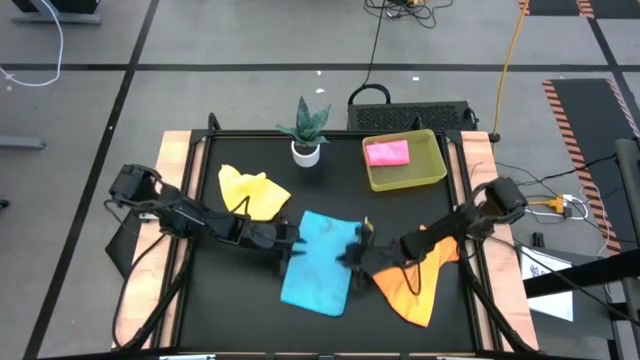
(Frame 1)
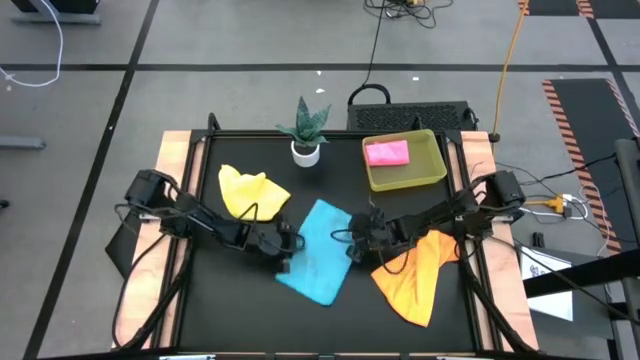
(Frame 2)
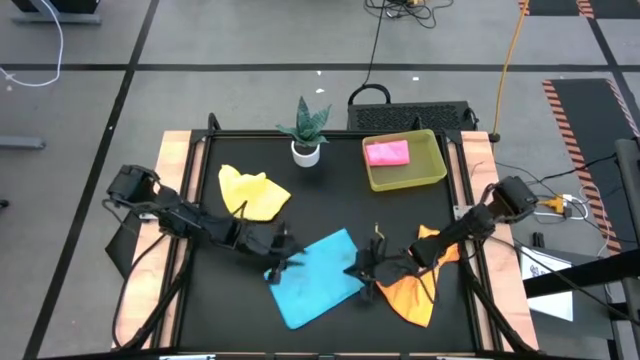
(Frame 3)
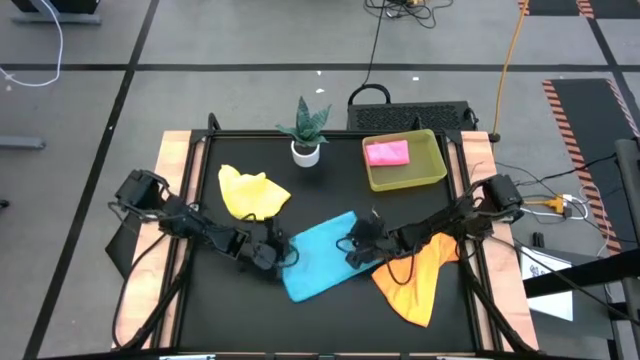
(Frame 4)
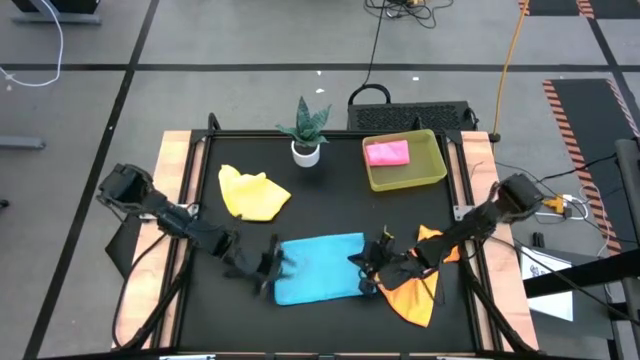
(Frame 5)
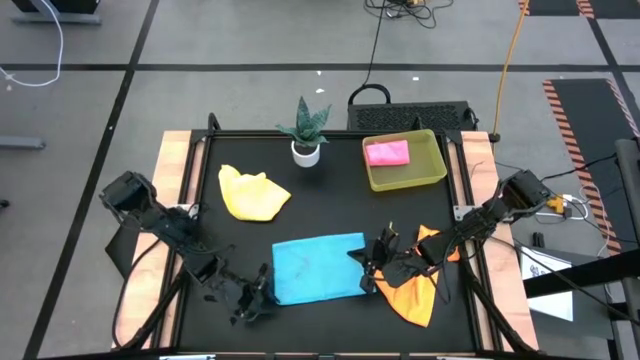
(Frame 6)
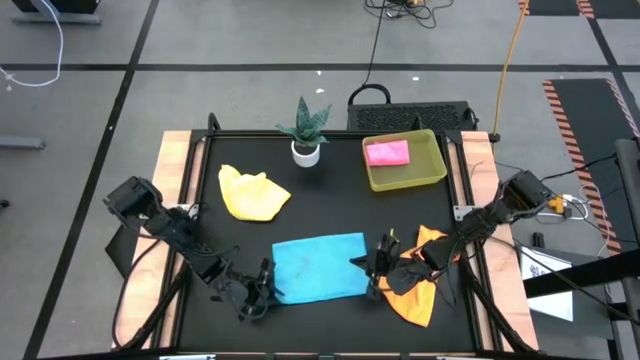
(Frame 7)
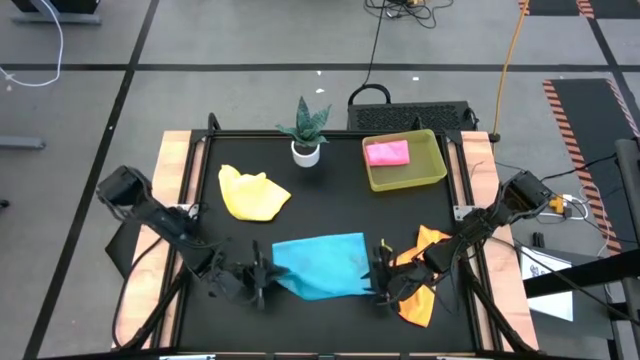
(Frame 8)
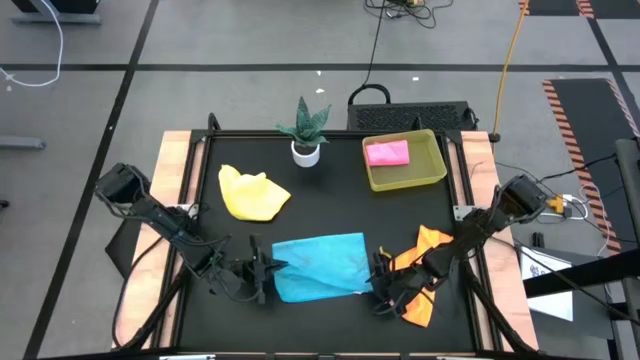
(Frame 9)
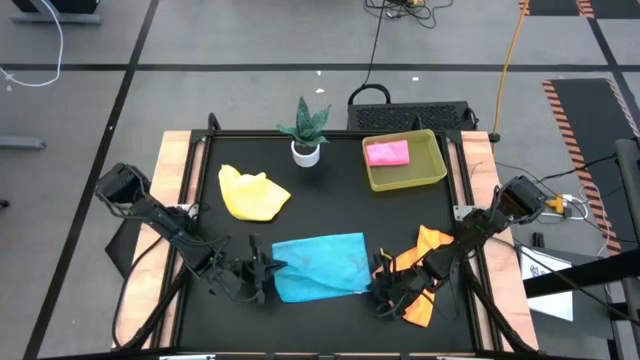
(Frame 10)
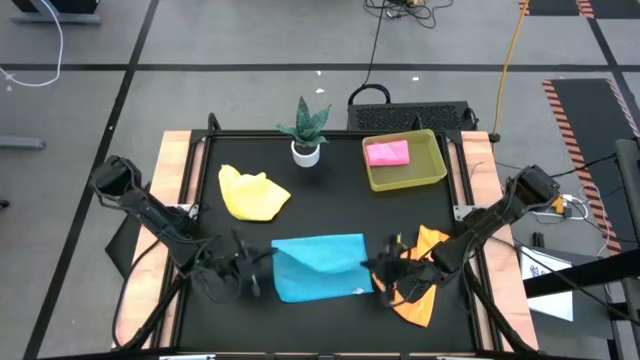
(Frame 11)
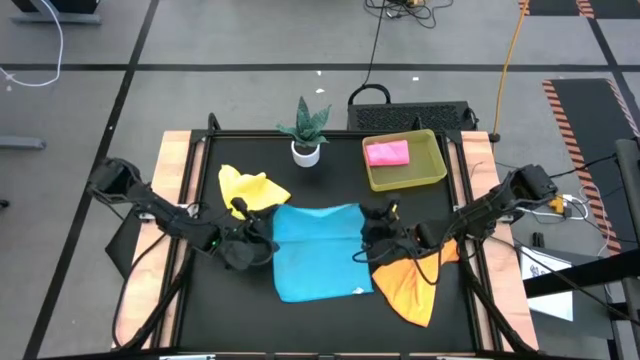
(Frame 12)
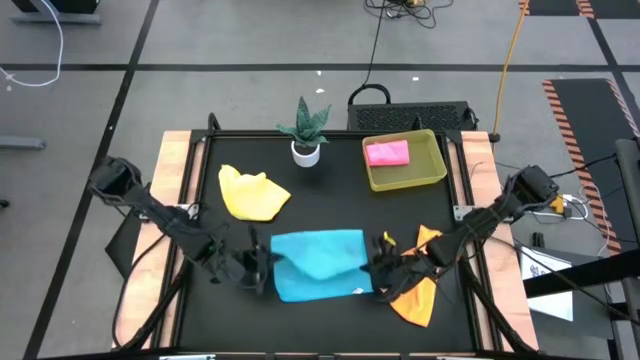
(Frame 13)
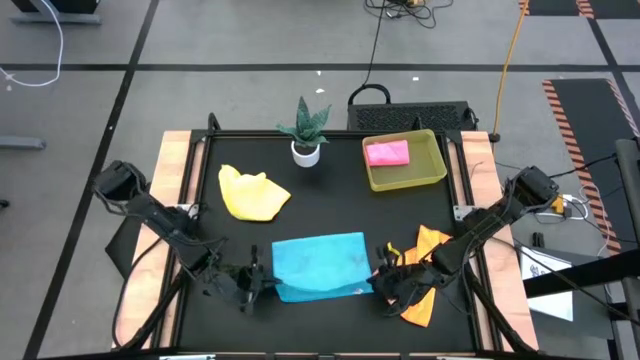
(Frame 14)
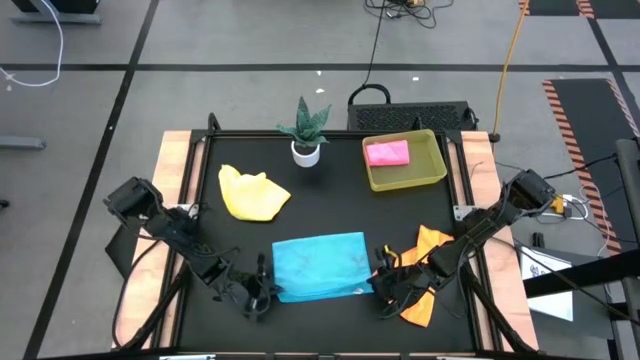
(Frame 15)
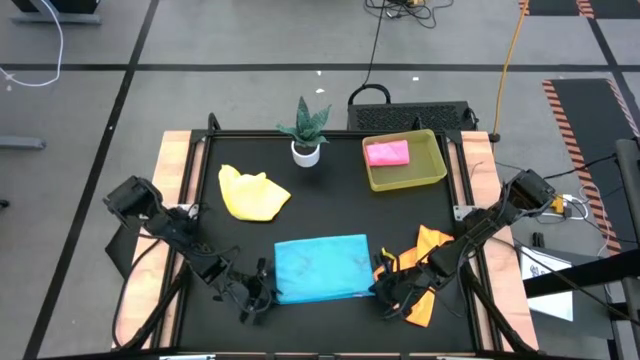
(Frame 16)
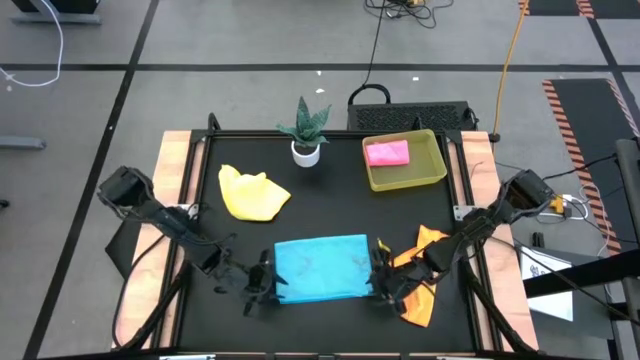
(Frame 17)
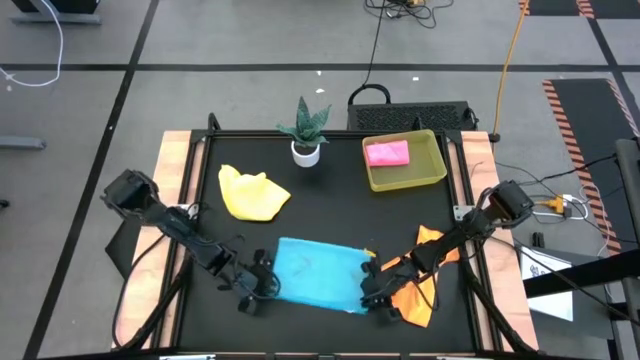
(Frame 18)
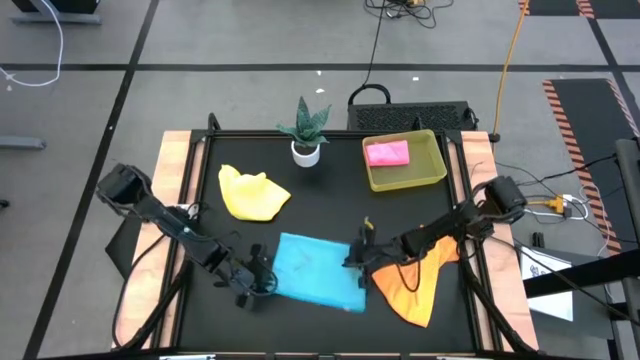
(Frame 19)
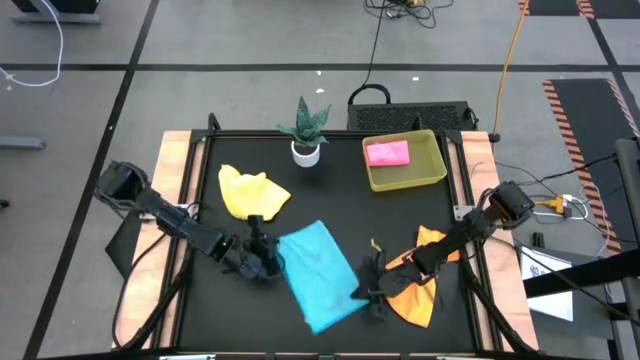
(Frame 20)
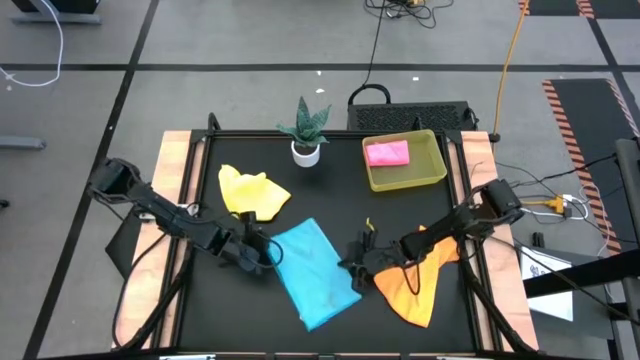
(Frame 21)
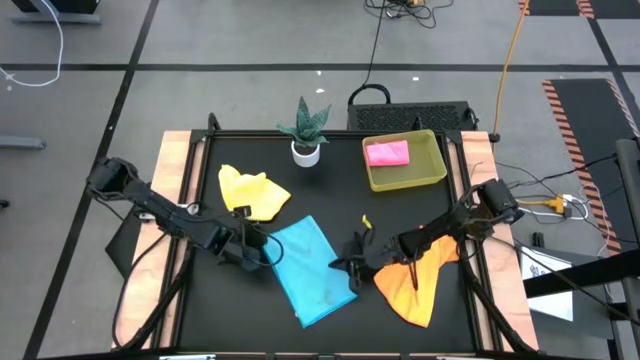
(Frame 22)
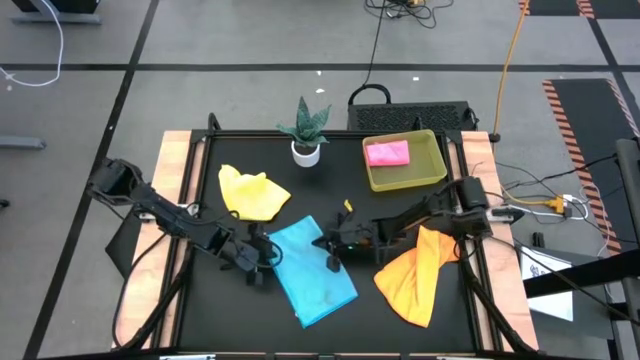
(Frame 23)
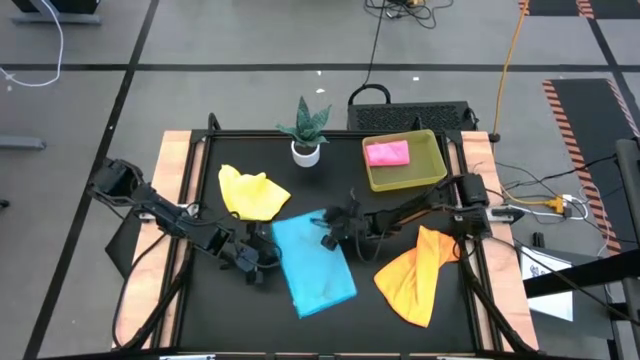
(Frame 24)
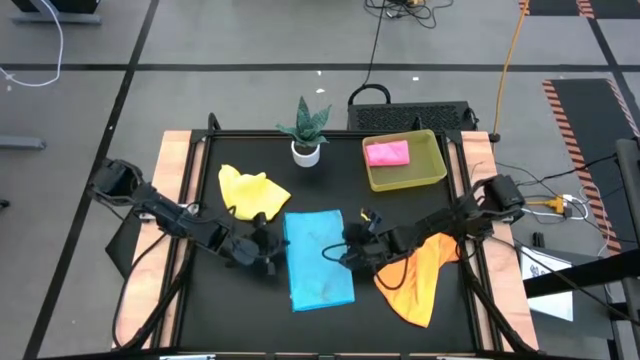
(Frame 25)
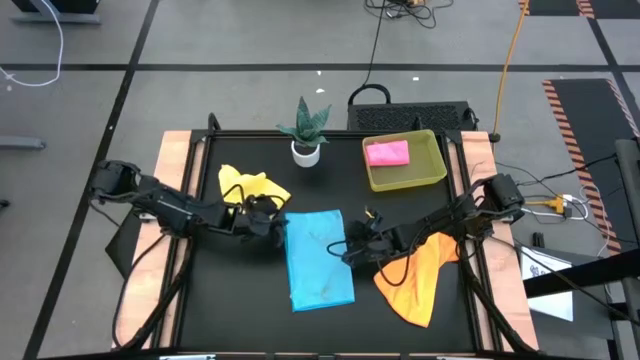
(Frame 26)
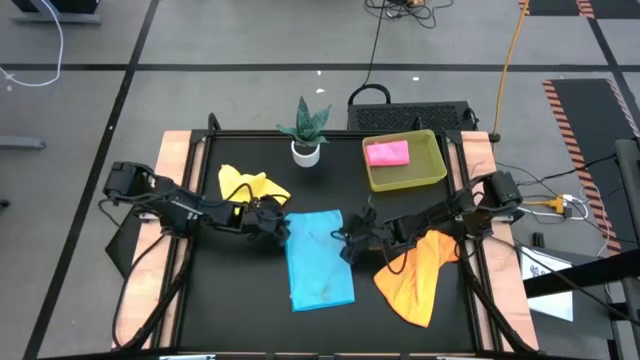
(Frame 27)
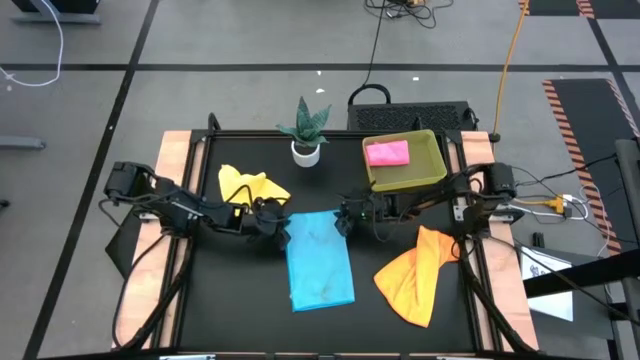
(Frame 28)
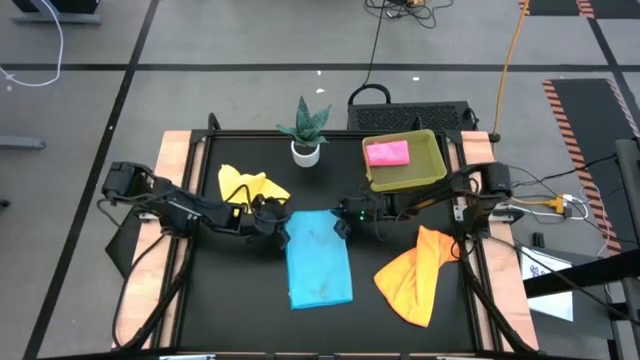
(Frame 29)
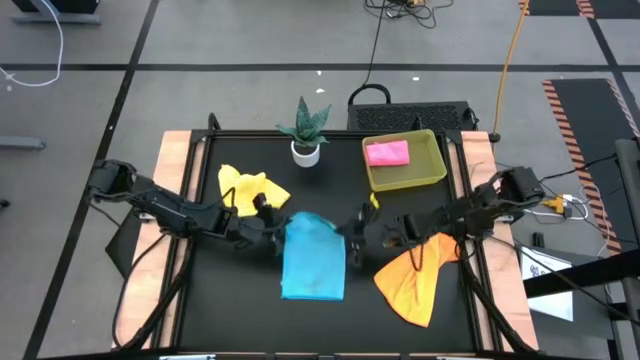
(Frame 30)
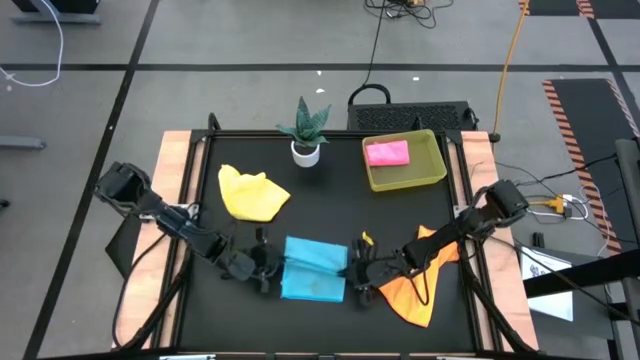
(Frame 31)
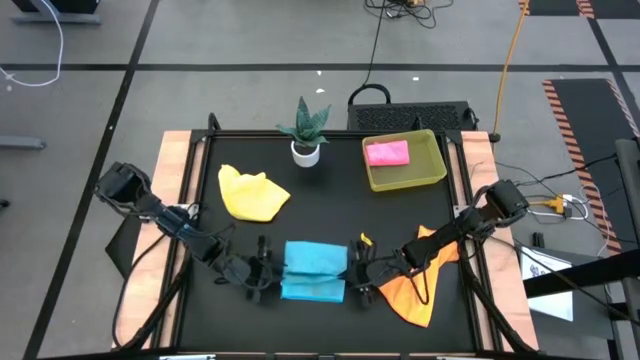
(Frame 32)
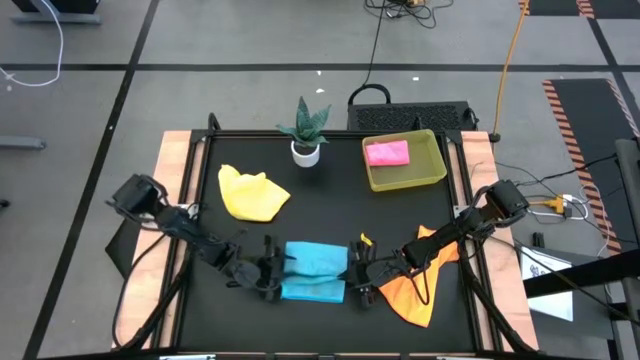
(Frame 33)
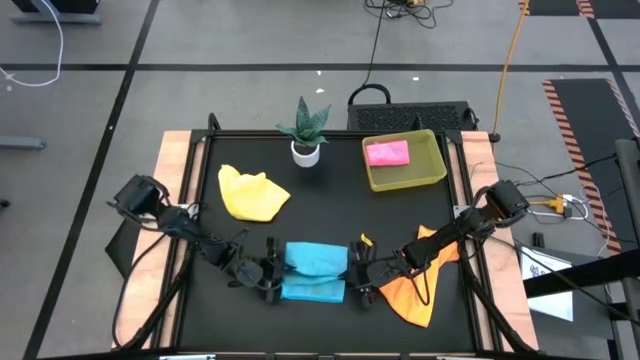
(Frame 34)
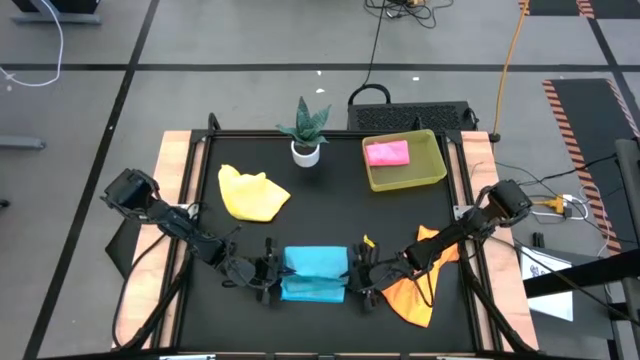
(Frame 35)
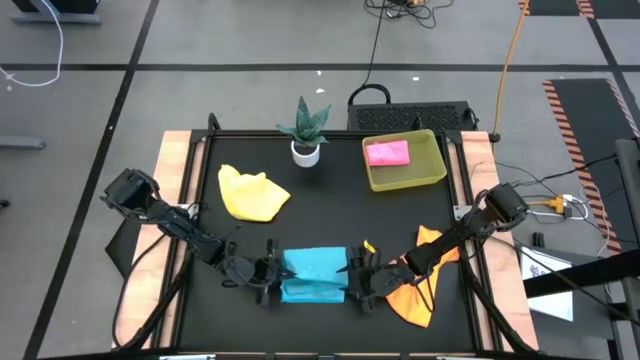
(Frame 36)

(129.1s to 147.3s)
Task: Fold microfiber towels
Fold the blue microfiber cloth

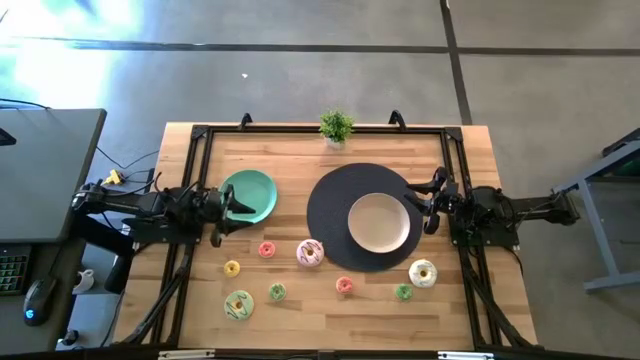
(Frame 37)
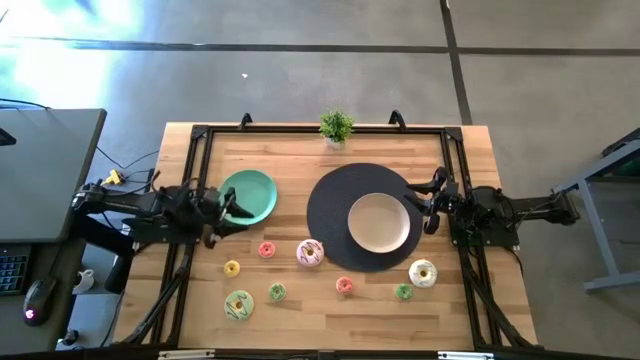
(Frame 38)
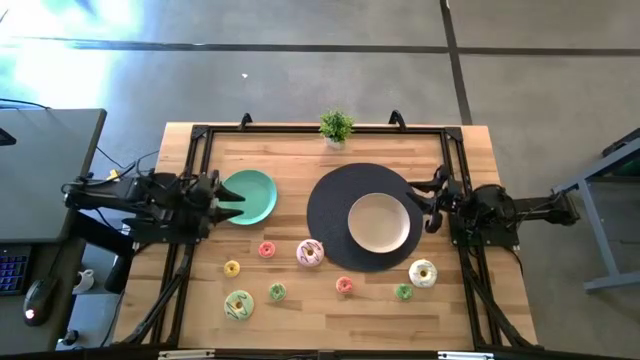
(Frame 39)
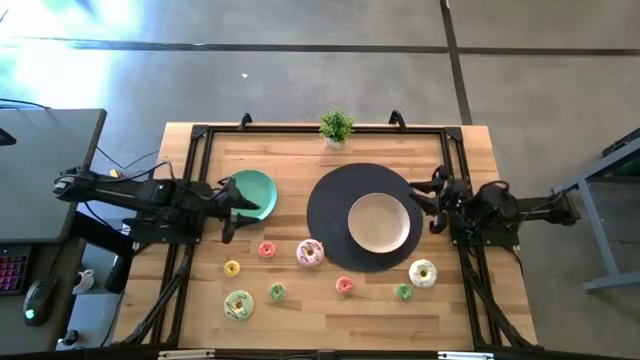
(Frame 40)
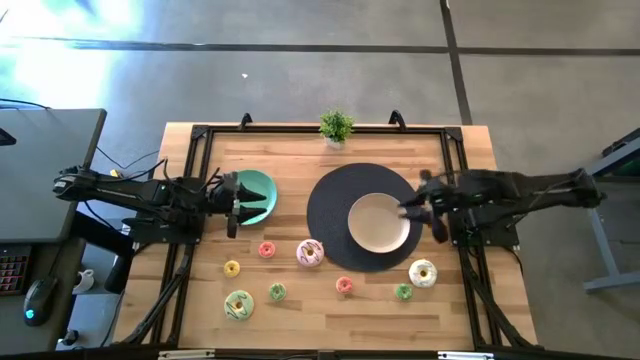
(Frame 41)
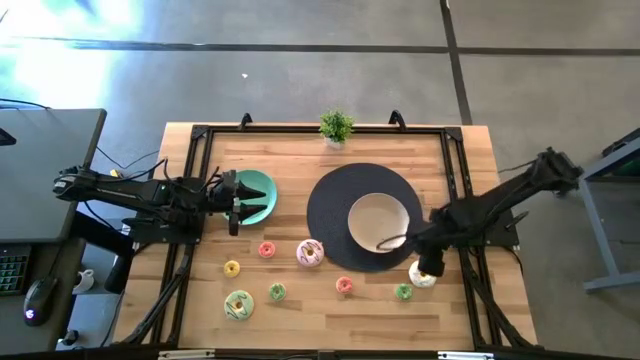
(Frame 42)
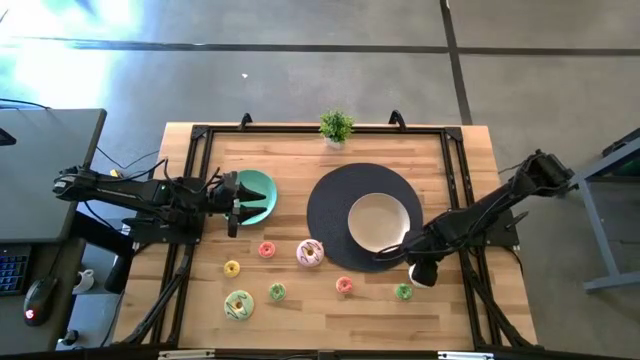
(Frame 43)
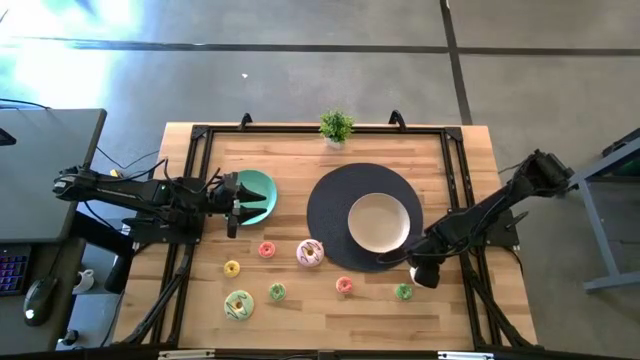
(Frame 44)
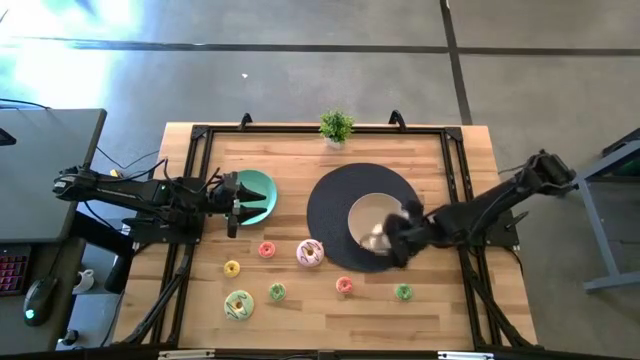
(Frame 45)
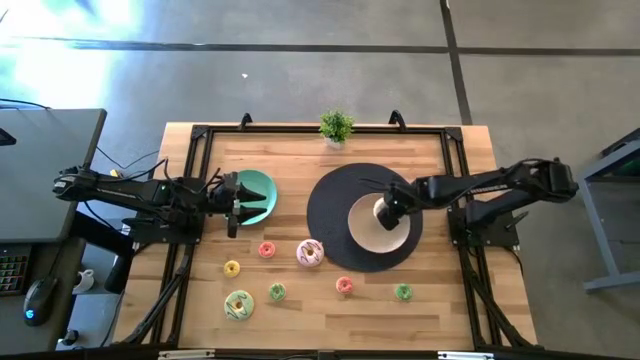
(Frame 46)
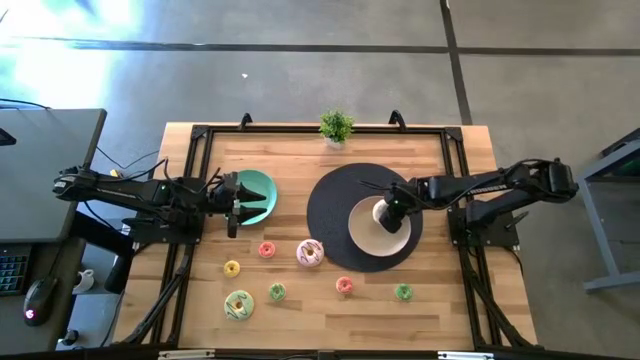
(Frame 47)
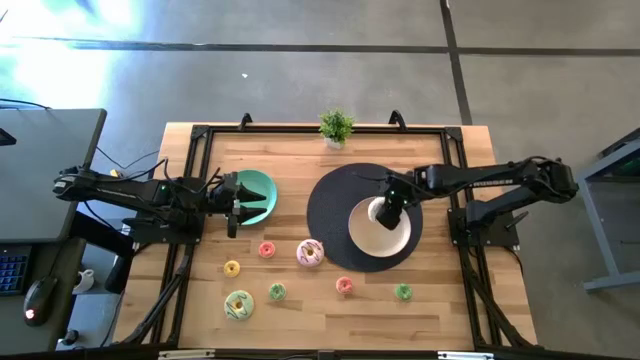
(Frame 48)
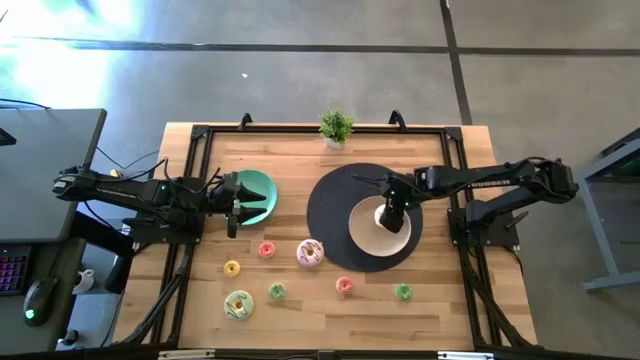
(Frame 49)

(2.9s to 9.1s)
Task: Pick & Place donuts
Put the large white donut on the white plate
